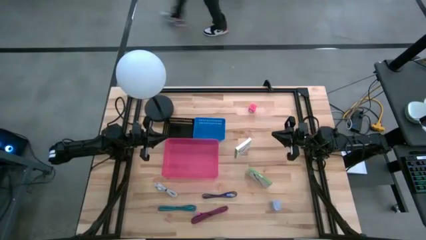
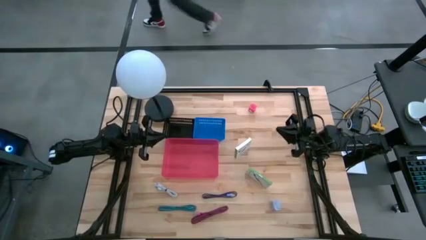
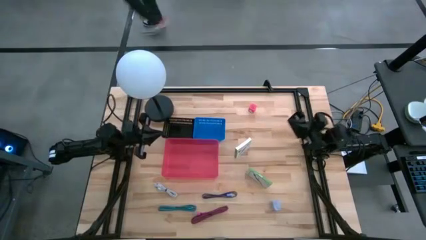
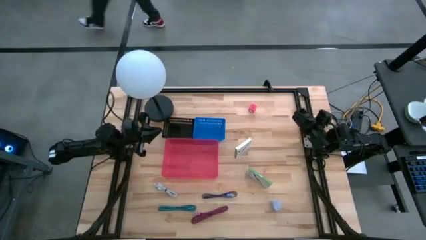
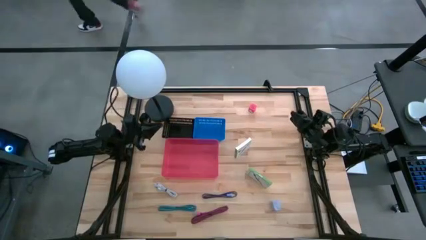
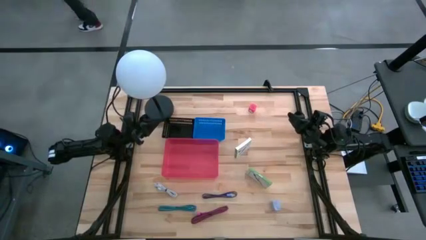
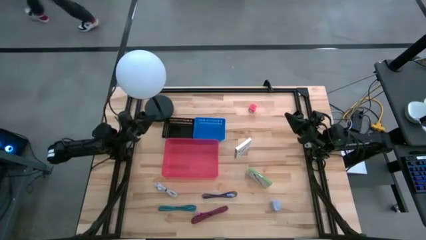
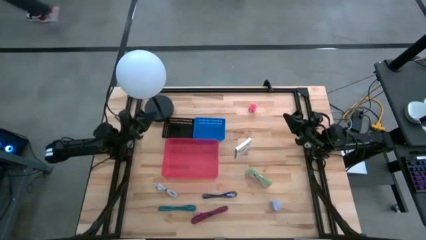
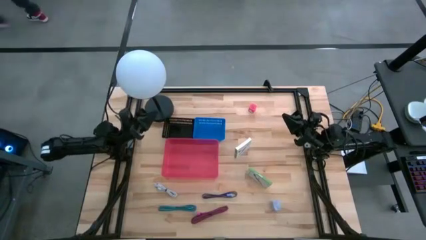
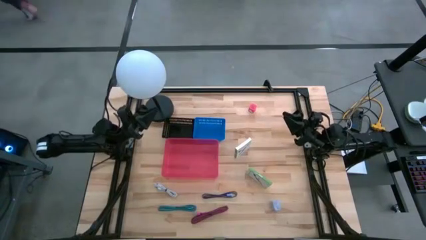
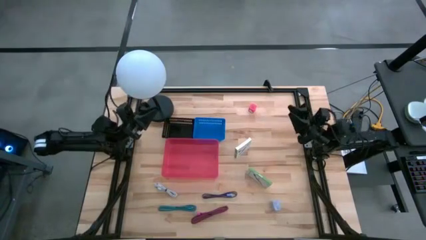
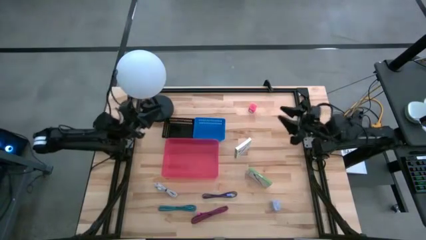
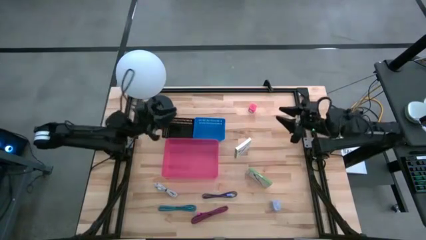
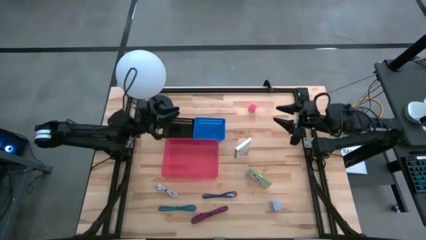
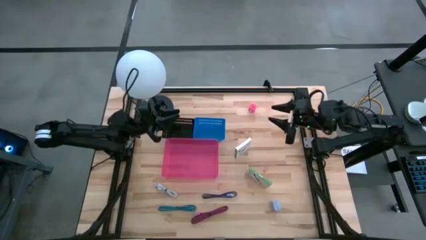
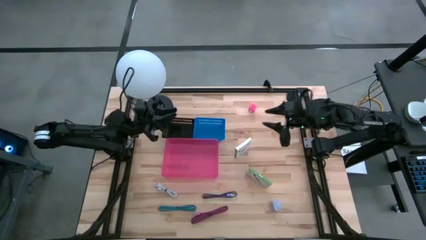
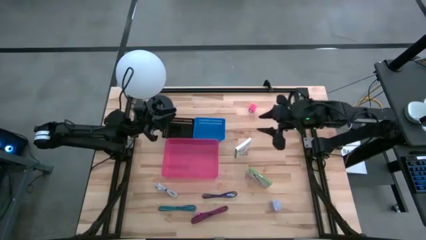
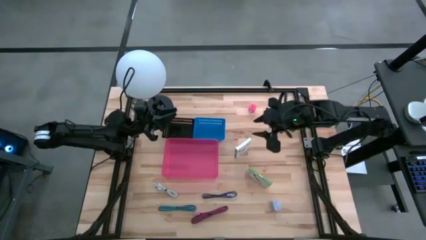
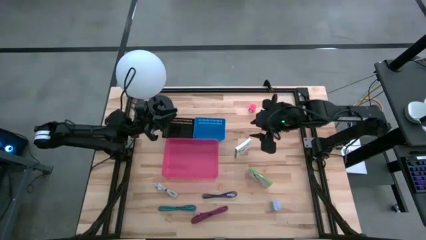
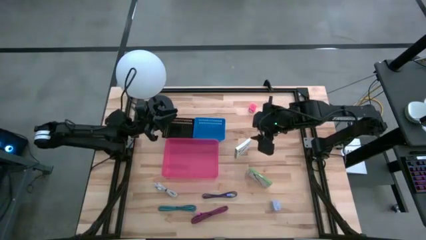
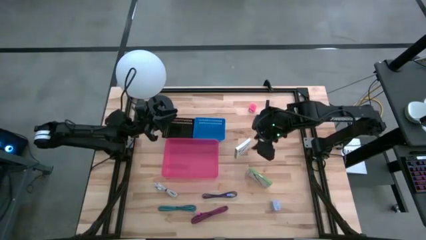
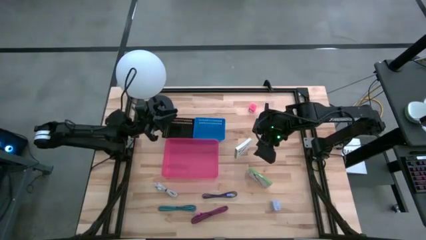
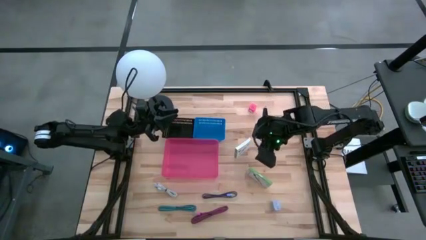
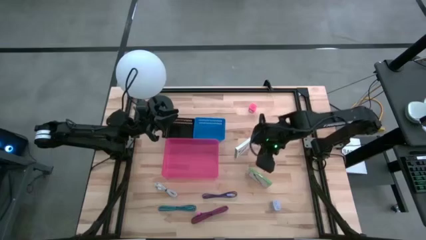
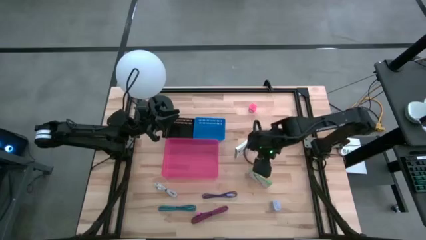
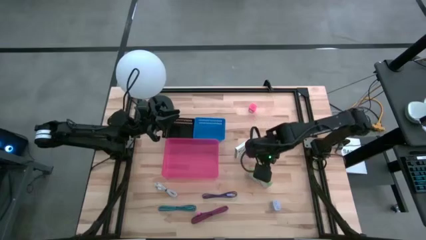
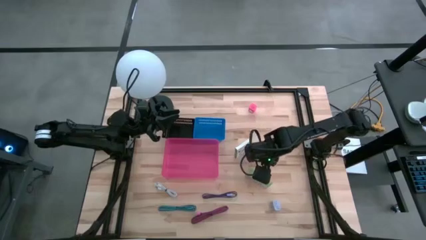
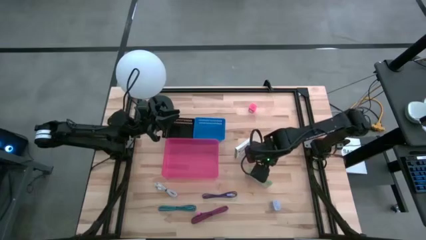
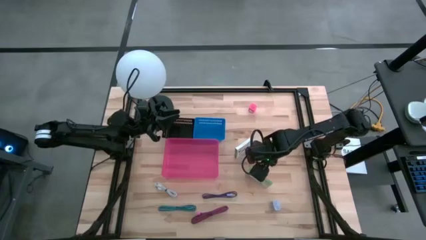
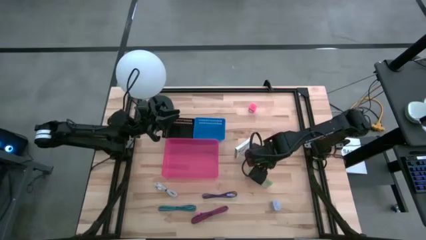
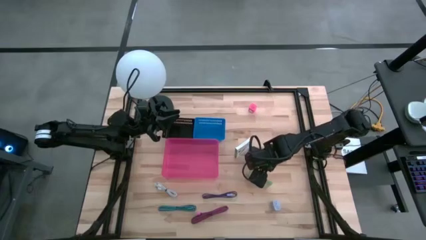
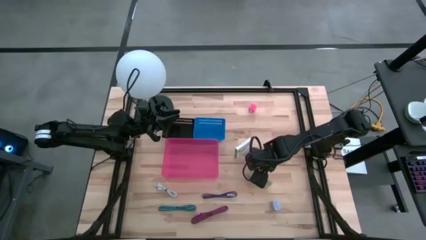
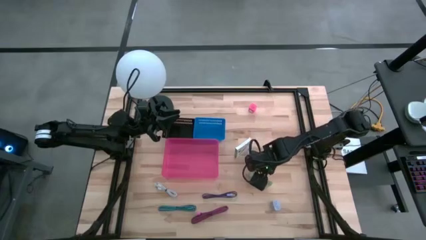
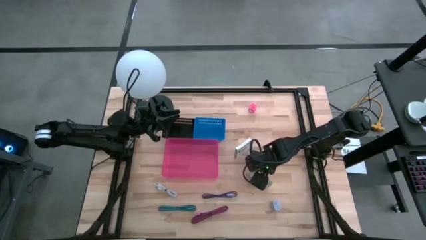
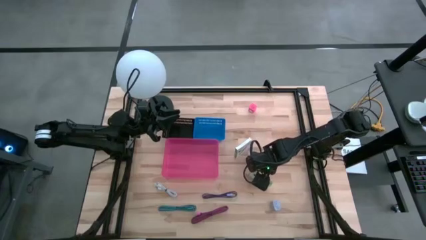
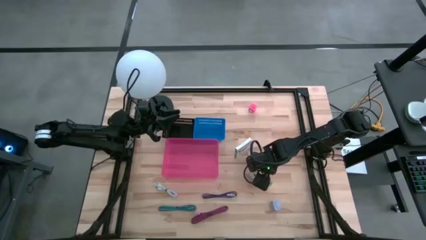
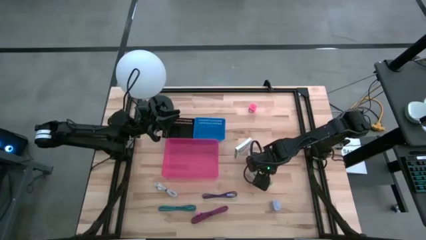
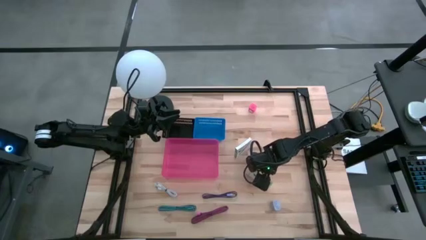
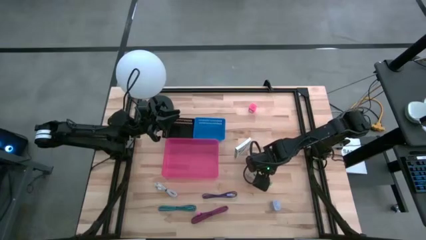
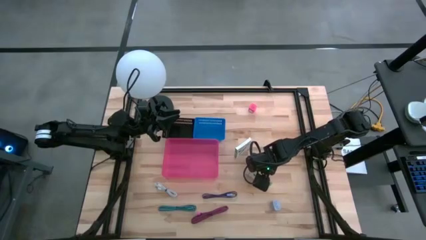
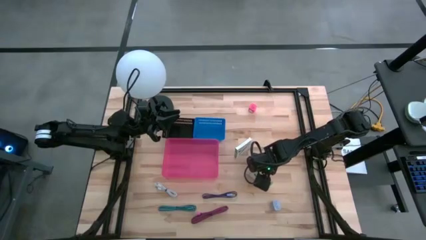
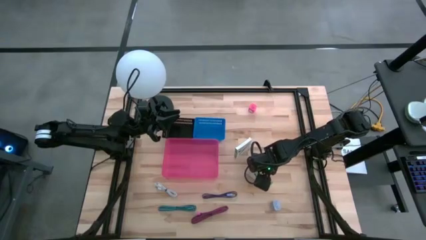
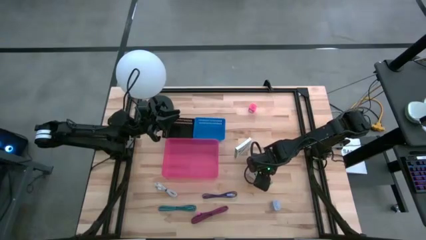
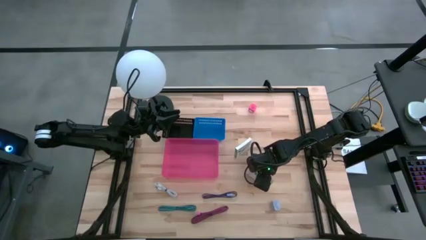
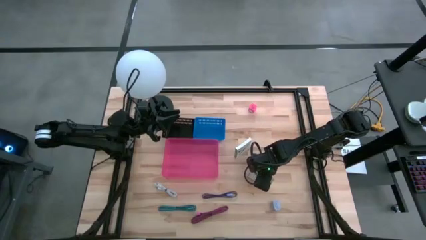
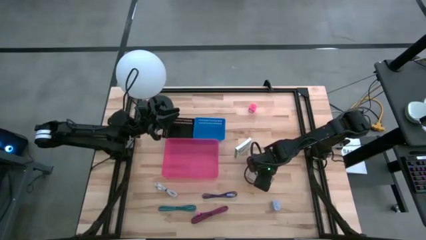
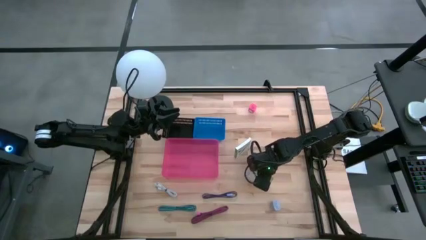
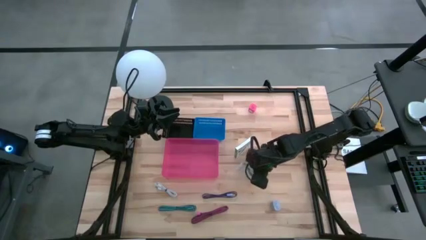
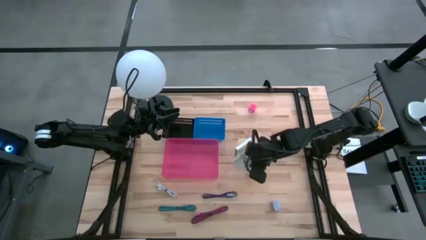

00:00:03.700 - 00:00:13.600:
Task: Pick and place items into bin
Put the bottom card reader box into the black bin

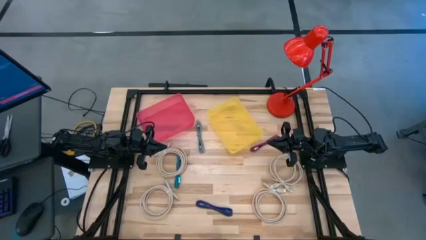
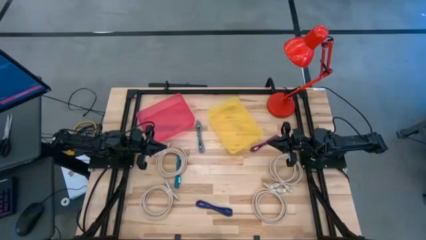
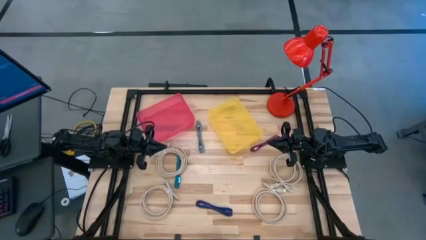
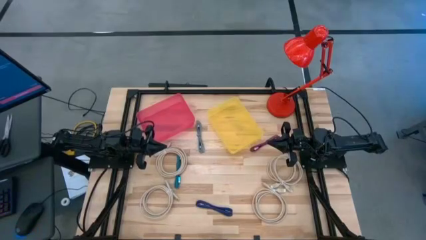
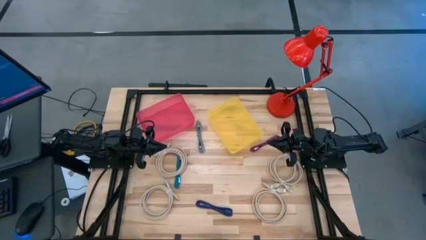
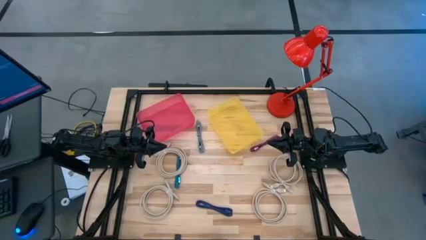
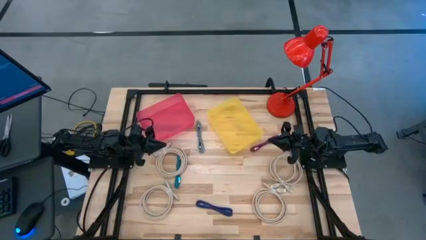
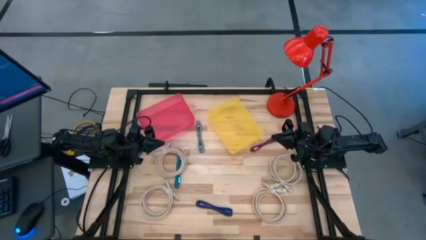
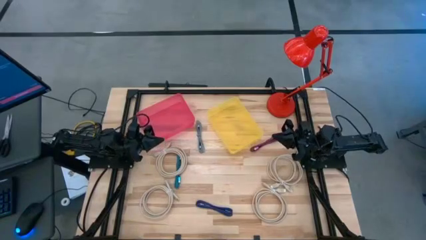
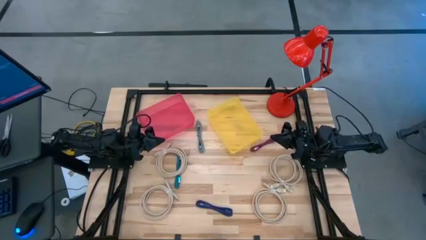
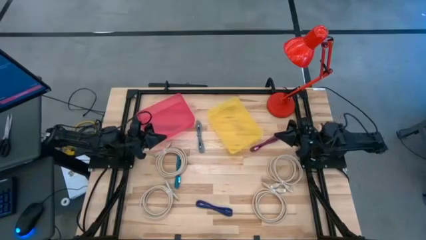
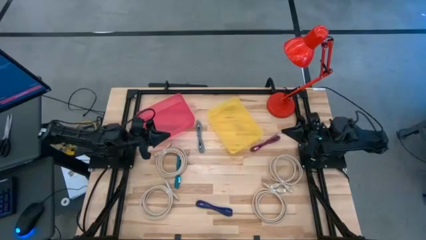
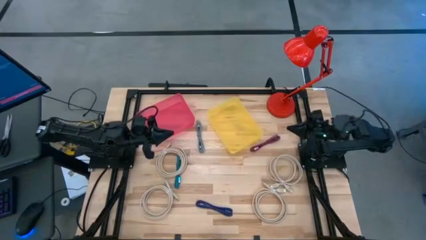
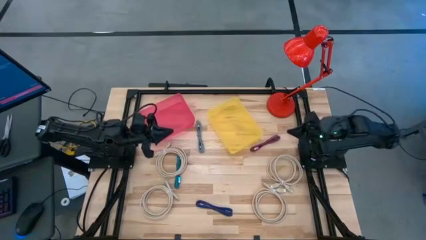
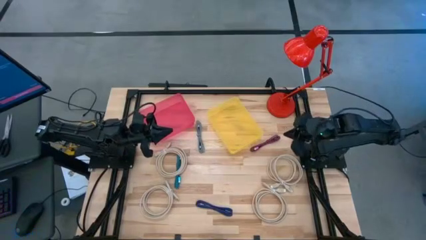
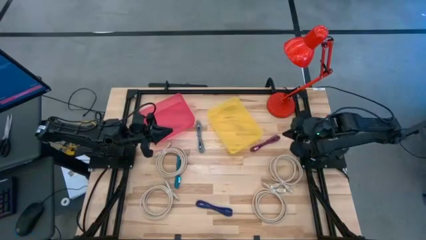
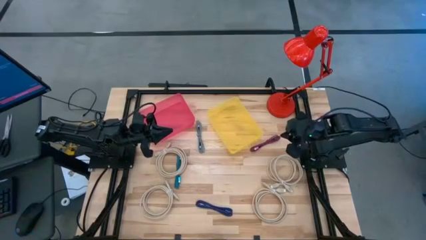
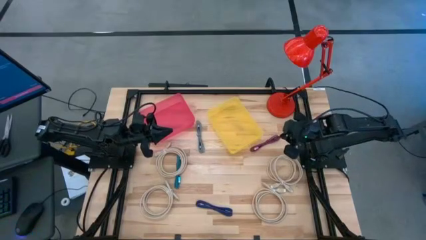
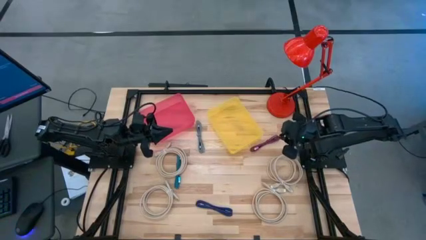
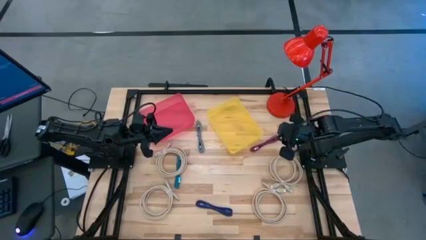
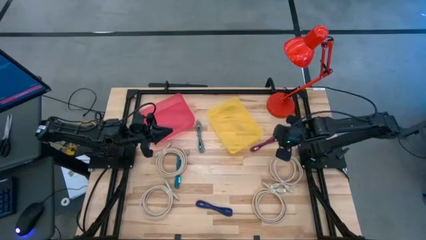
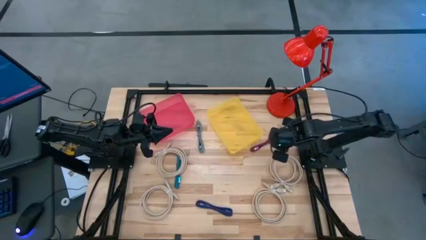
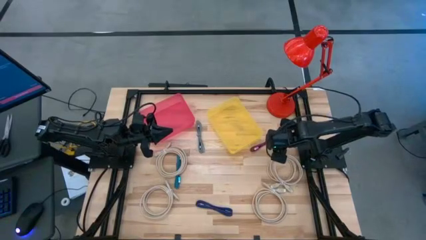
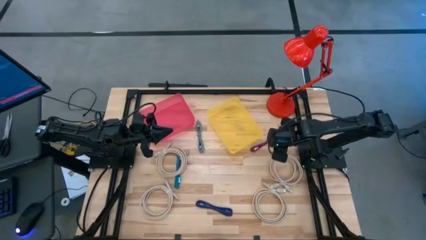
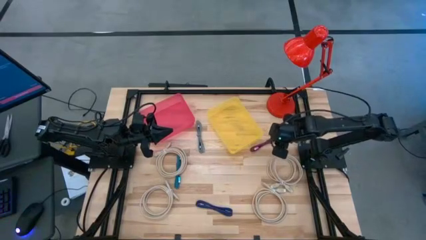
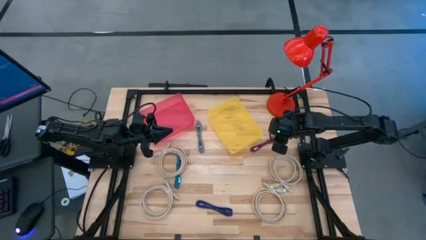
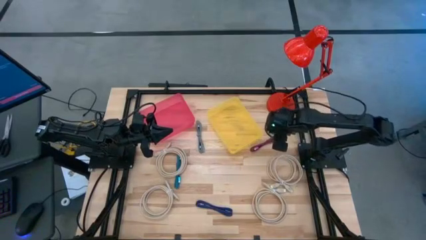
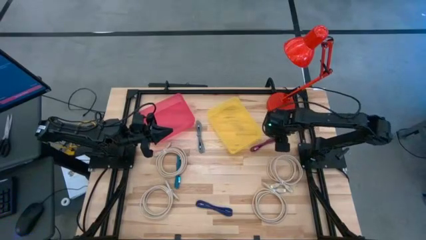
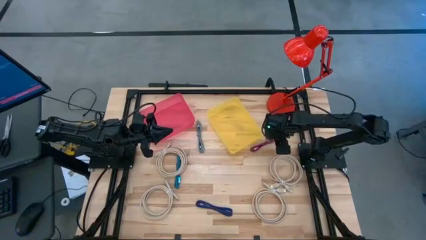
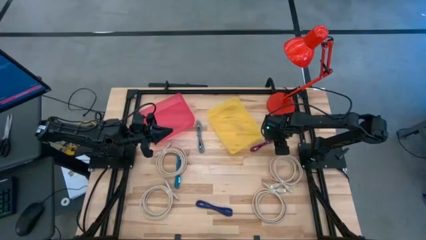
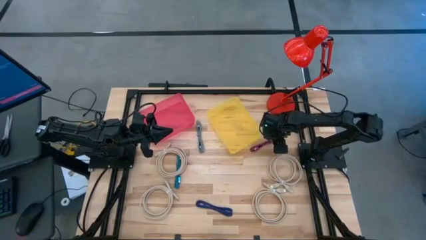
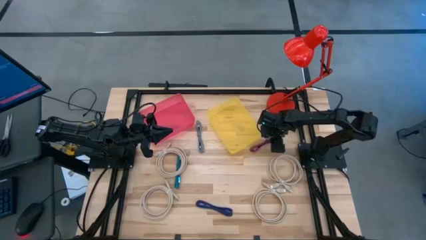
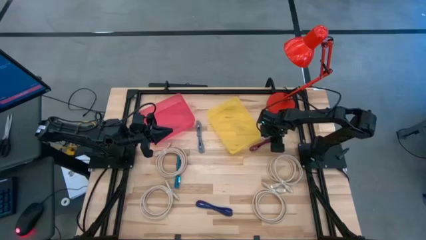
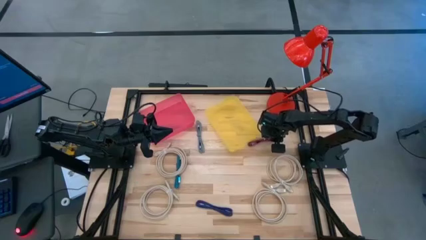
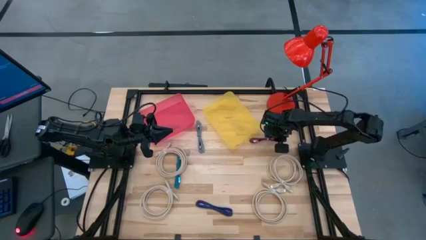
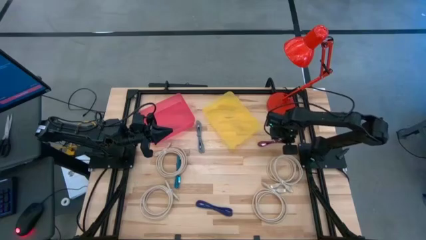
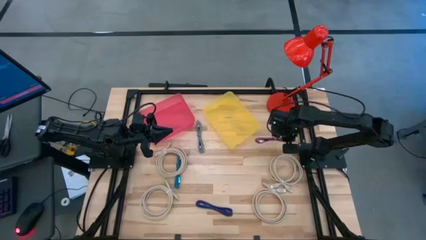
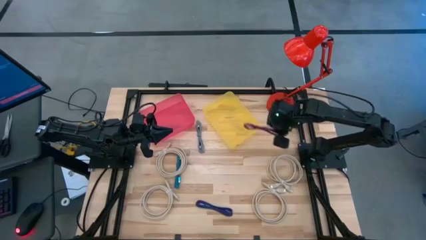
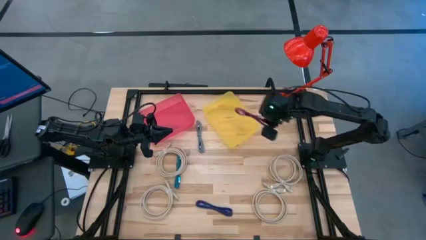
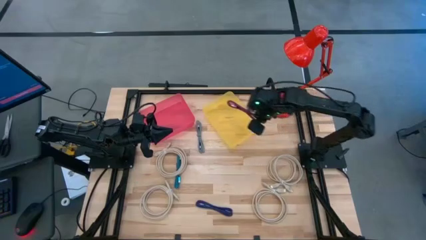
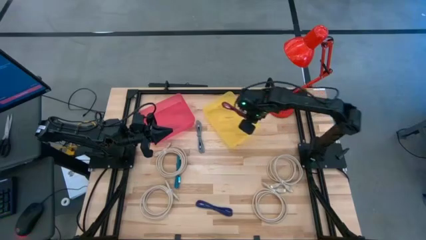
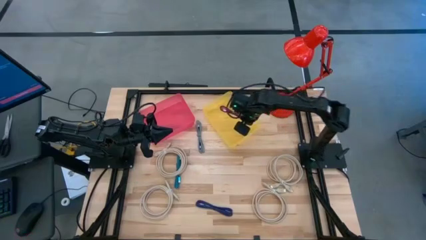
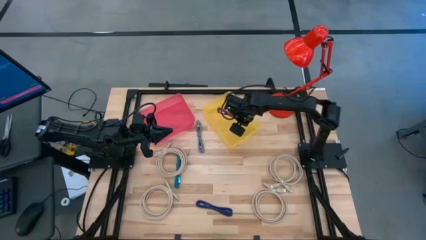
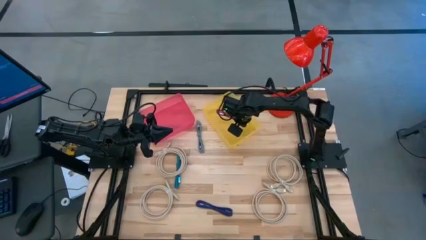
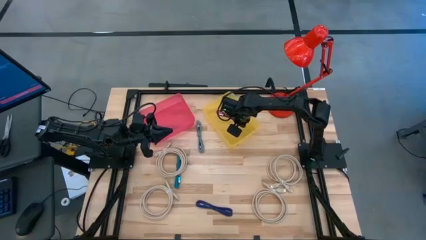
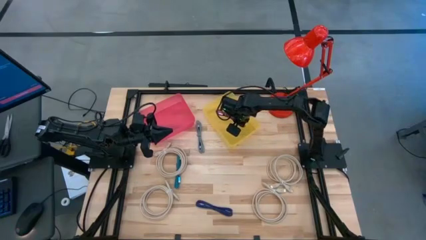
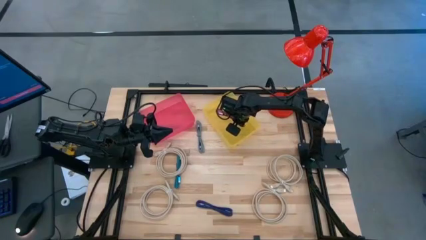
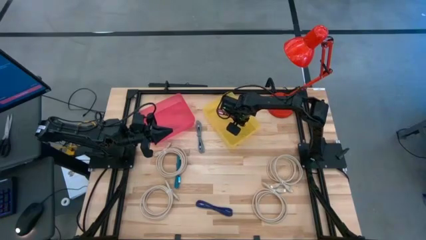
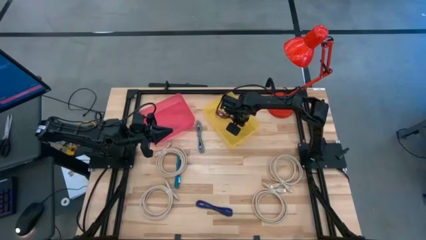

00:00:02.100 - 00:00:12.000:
Task: Pick & Place USB Port
Put the pink charger cable into the yellow transparent bin
